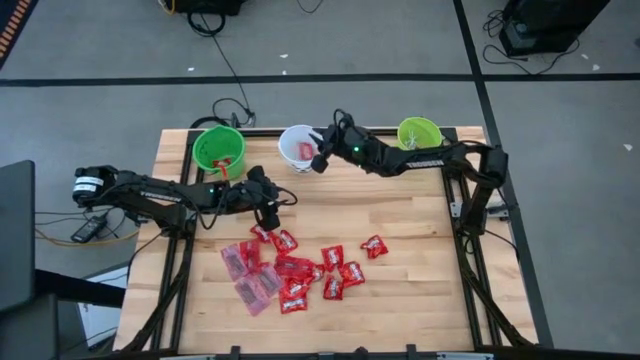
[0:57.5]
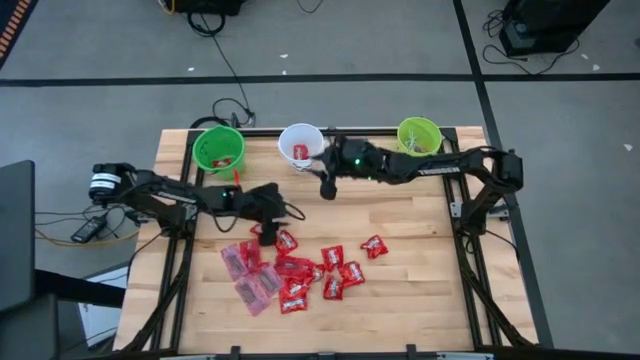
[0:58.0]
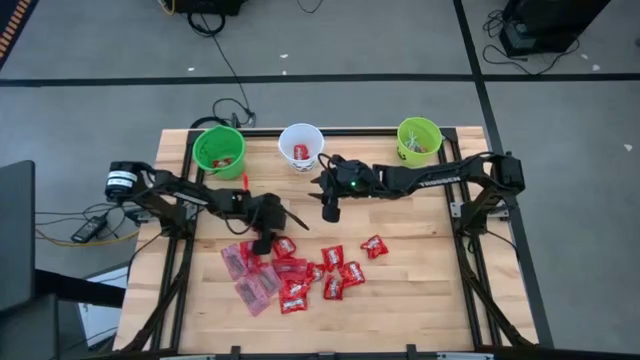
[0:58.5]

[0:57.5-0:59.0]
Task: Sort candy by brand, put in halloween buckets
Put the red candy into the white bucket

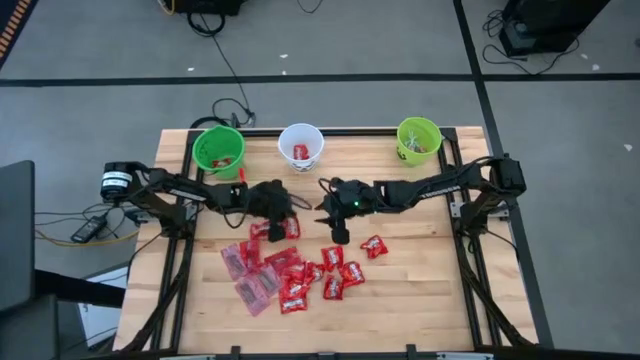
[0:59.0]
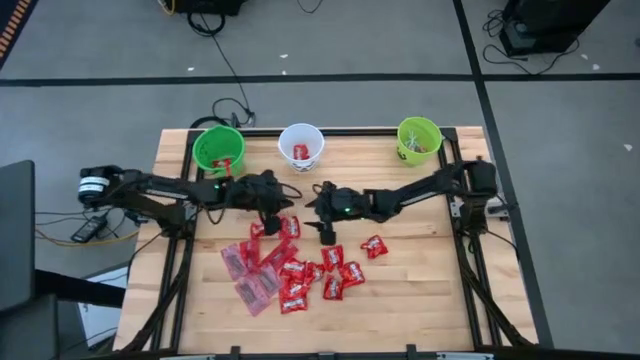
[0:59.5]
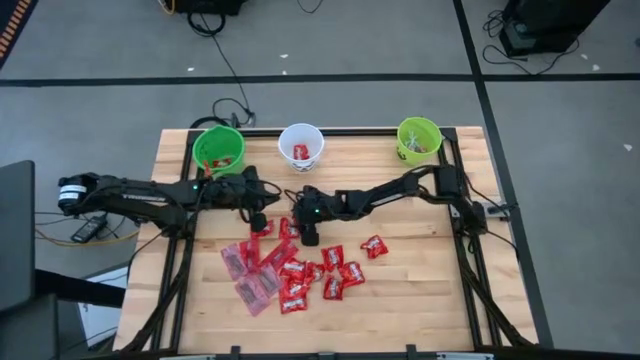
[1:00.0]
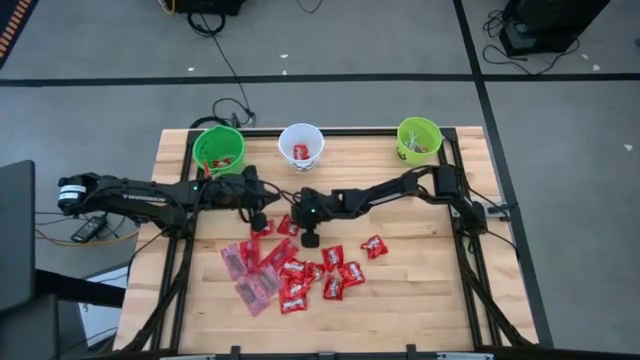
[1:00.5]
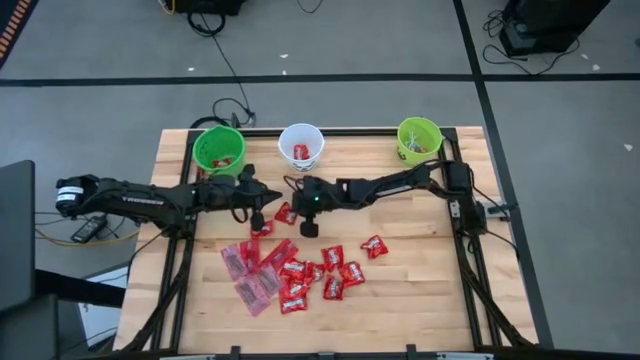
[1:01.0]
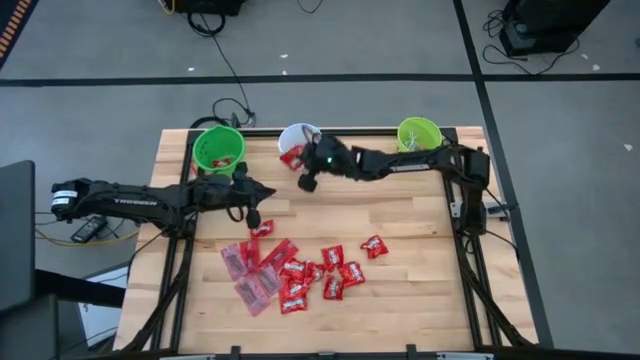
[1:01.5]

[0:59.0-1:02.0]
Put the red candy into the white bucket

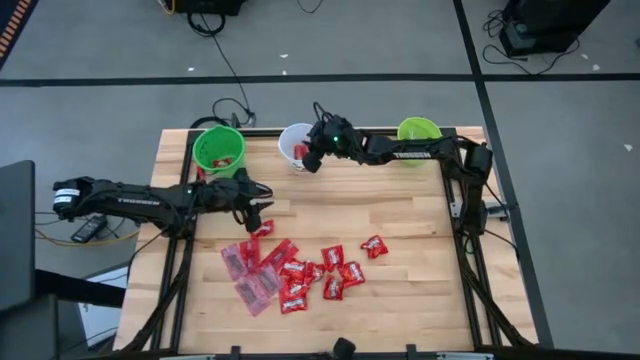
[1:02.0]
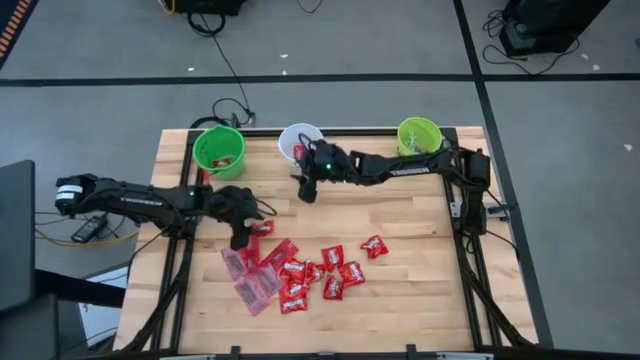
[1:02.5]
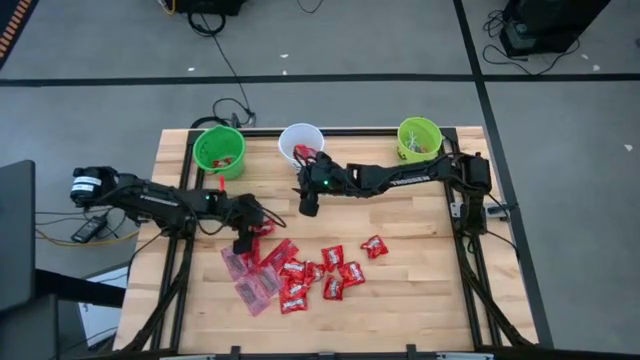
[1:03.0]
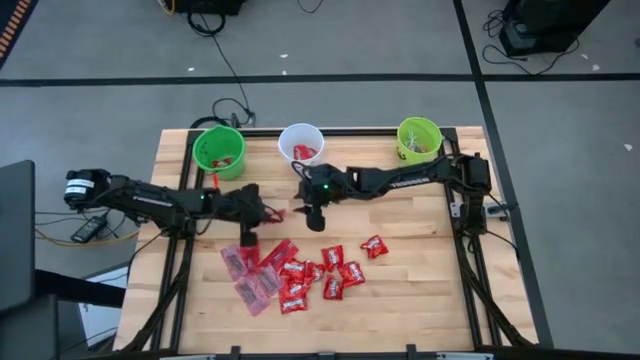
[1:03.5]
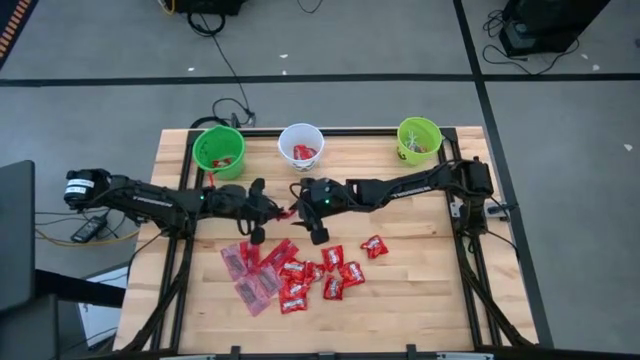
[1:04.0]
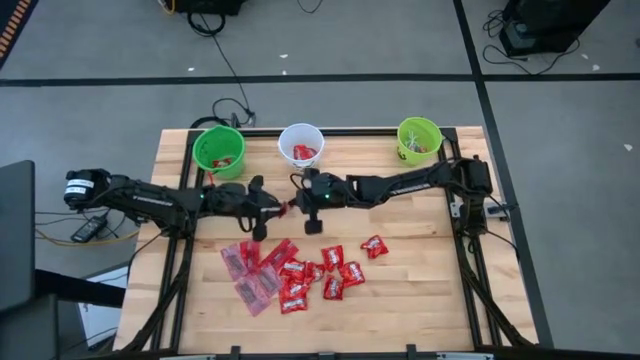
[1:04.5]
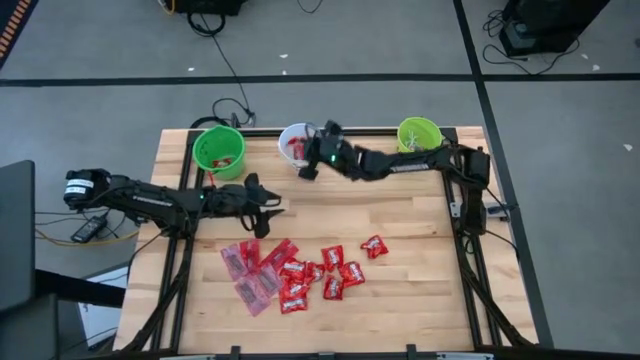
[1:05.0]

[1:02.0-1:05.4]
Put the red candy into the white bucket

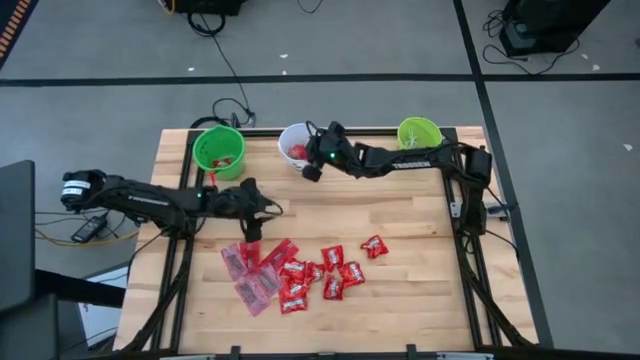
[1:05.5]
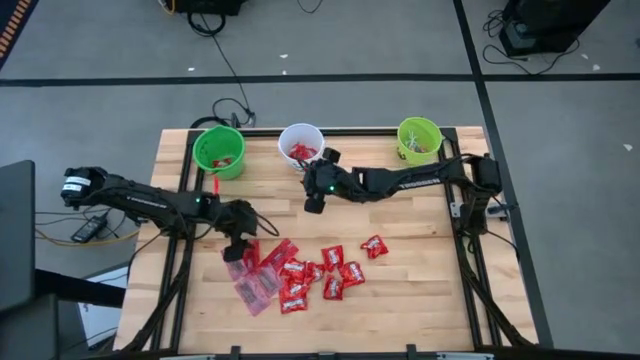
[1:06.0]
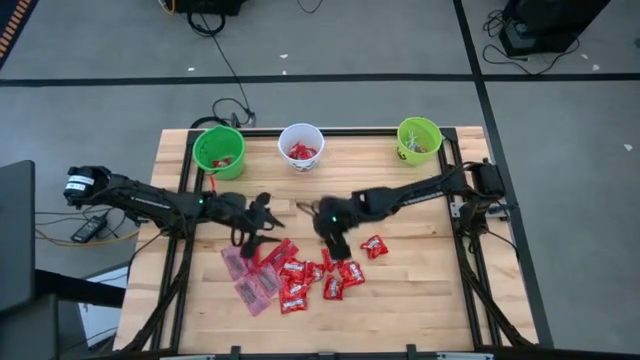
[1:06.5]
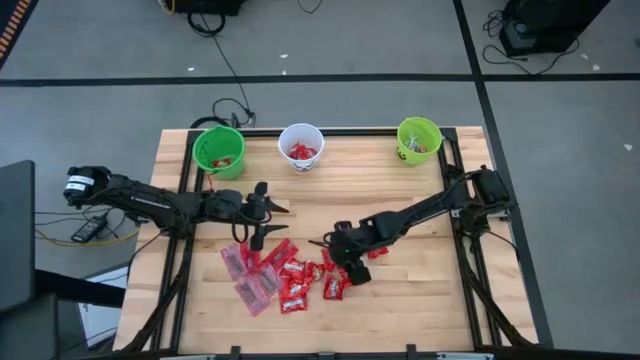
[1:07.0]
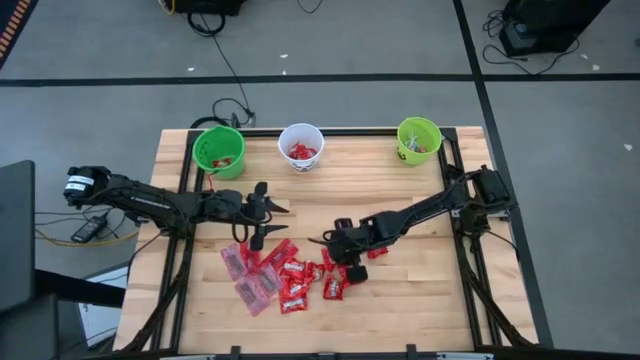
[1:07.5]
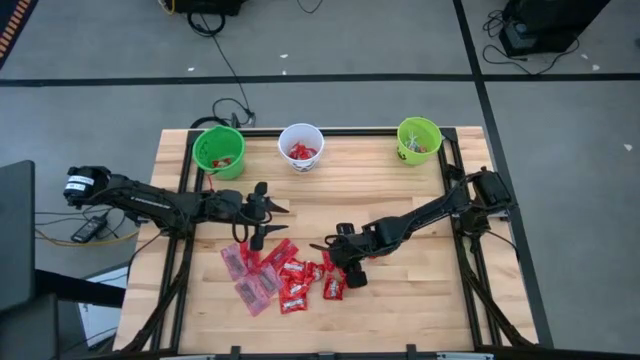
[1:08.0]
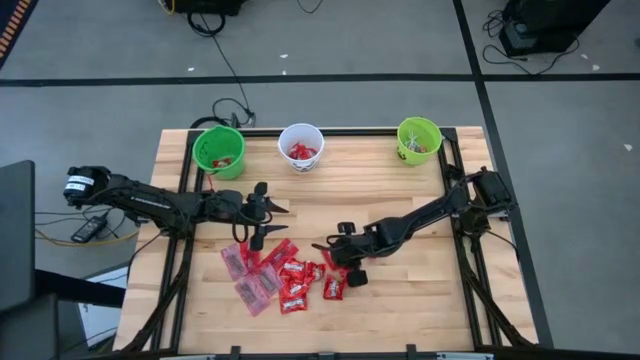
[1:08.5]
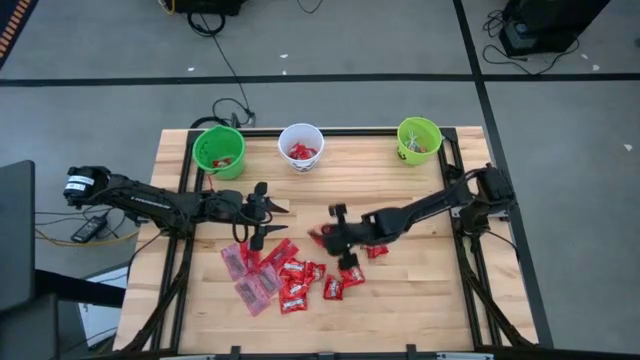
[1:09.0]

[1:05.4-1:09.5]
Put the red candy into the white bucket

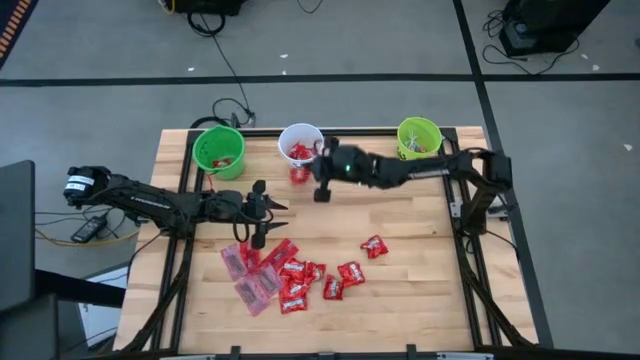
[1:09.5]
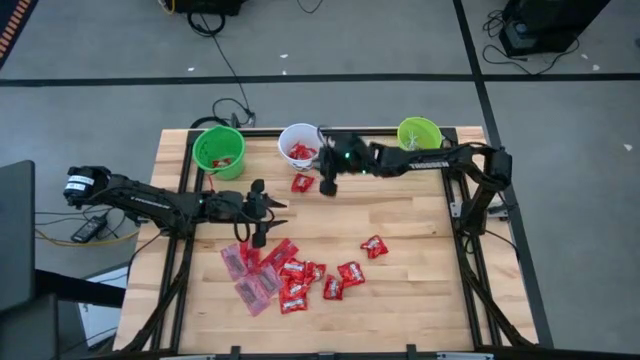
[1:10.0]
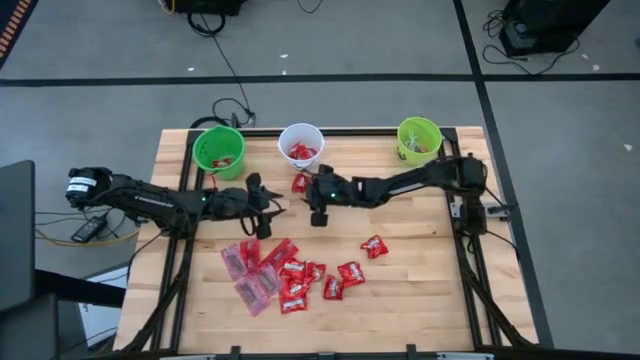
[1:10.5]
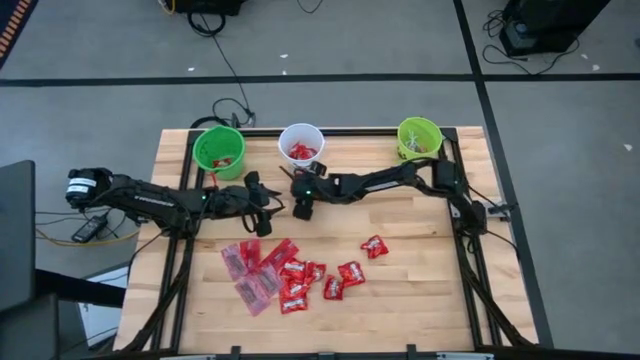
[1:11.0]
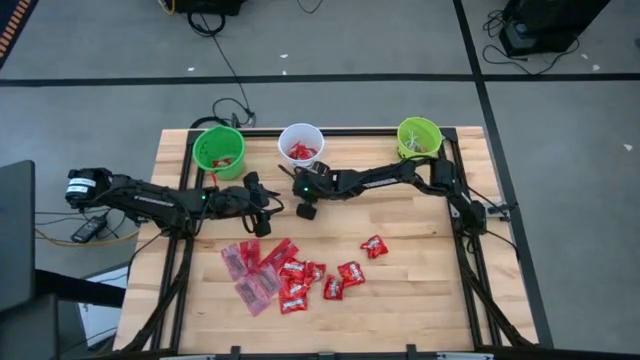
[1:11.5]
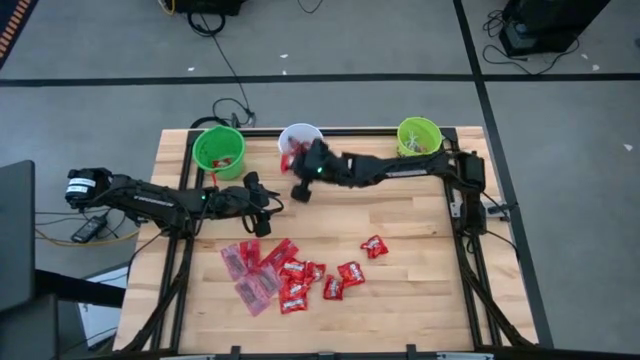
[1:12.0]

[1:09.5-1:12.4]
Put the red candy into the white bucket

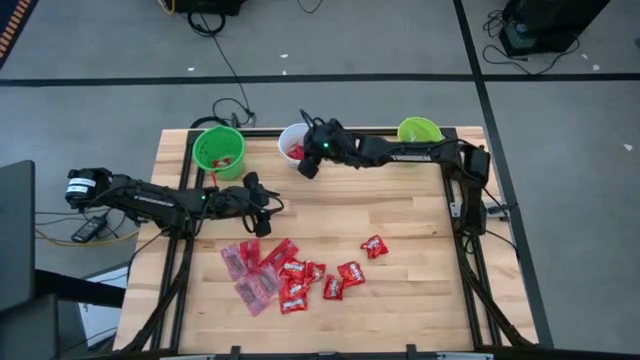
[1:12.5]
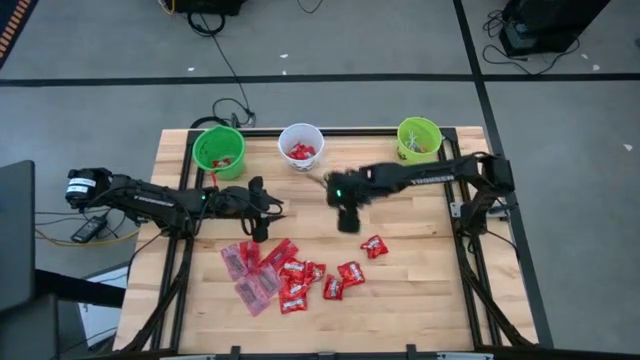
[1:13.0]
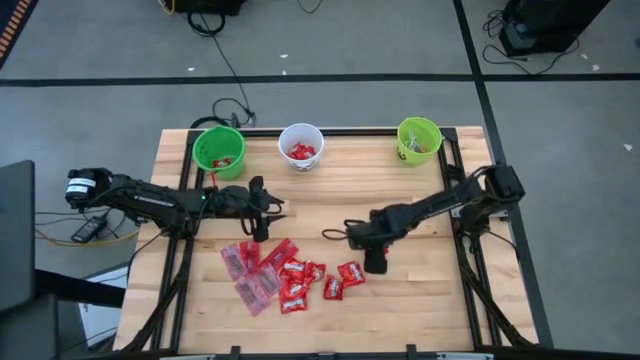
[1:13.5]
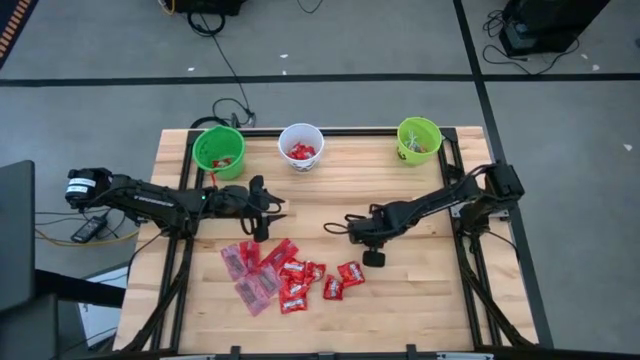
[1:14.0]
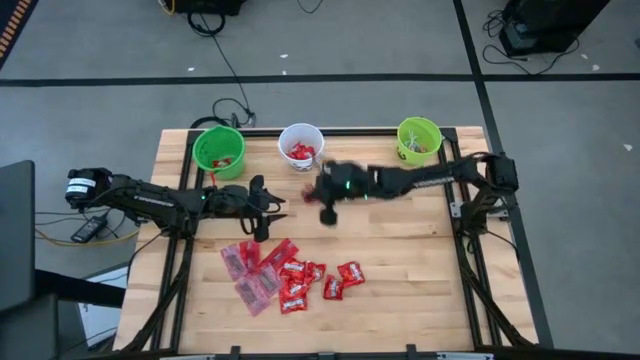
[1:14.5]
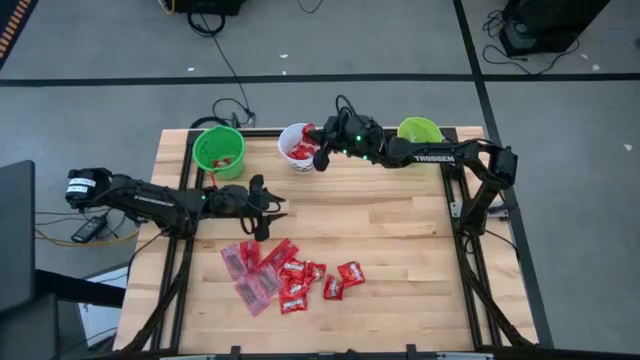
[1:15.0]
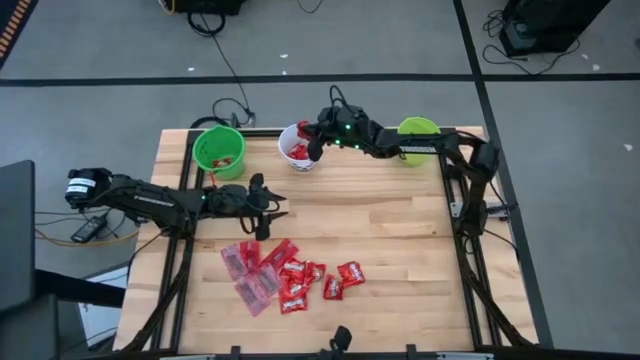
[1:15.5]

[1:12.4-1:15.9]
Put the red candy into the white bucket

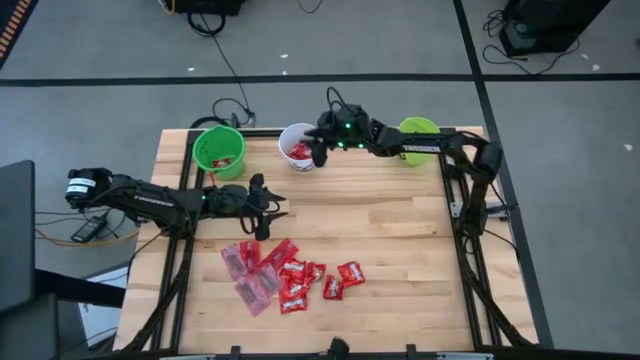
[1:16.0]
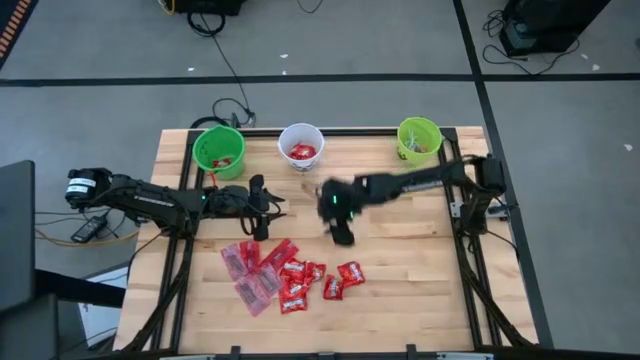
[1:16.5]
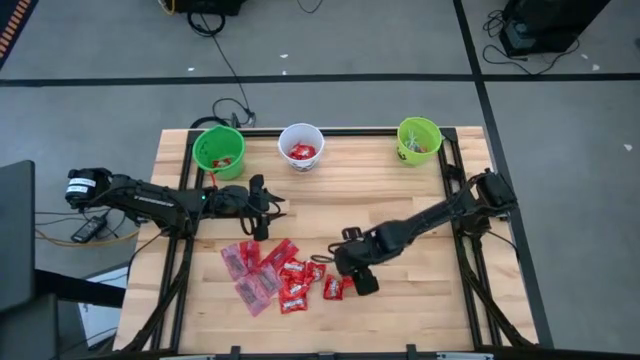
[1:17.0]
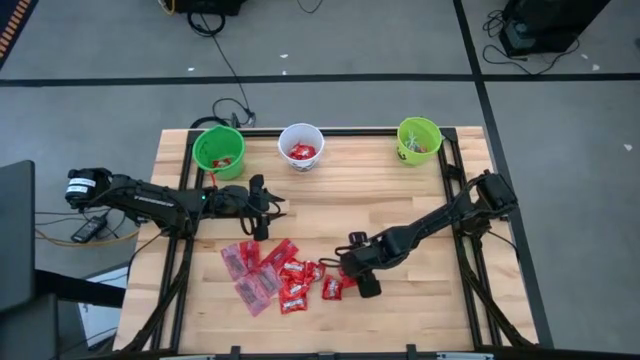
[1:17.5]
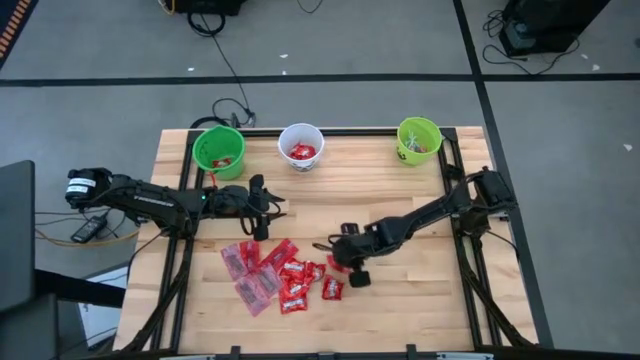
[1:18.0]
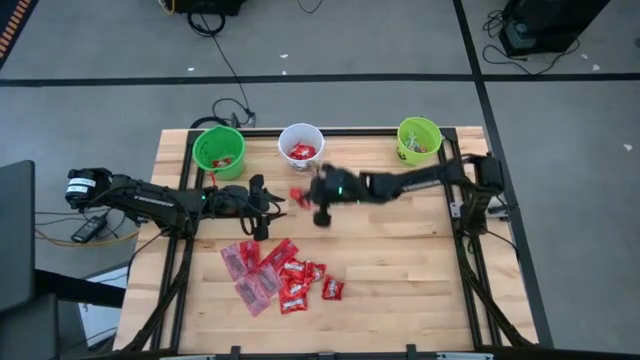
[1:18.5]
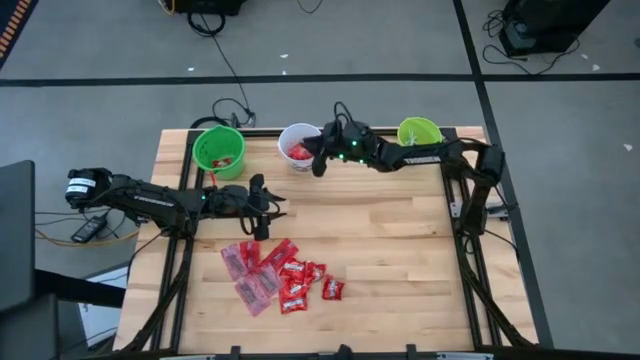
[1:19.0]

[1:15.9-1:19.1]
Put the red candy into the white bucket
